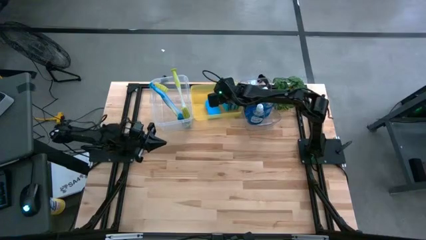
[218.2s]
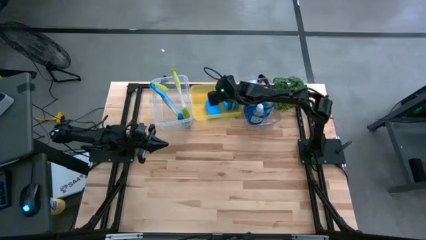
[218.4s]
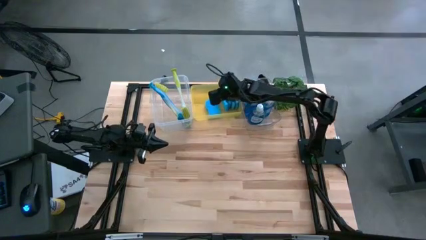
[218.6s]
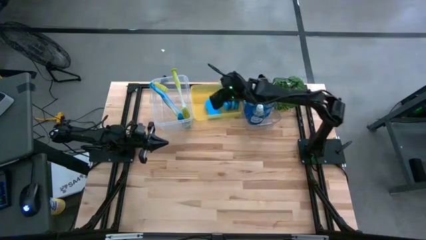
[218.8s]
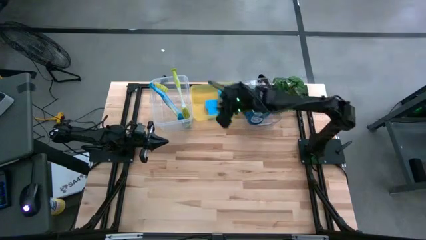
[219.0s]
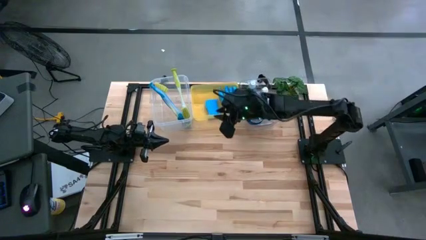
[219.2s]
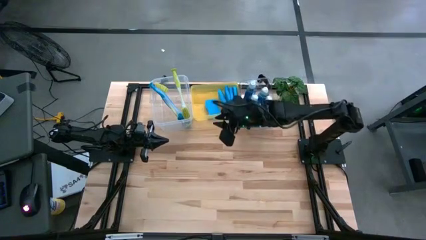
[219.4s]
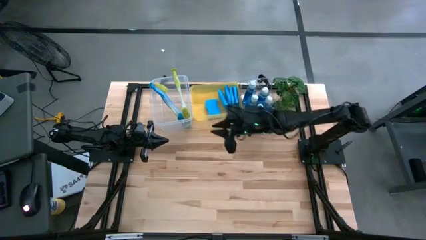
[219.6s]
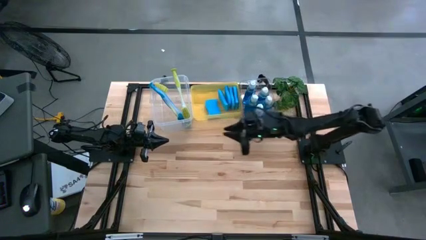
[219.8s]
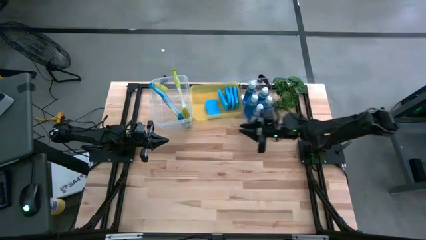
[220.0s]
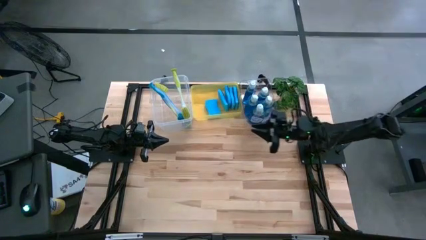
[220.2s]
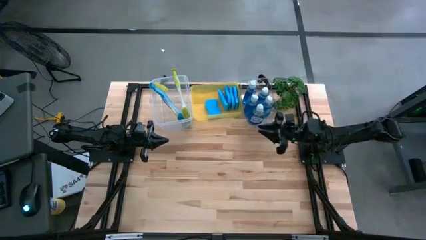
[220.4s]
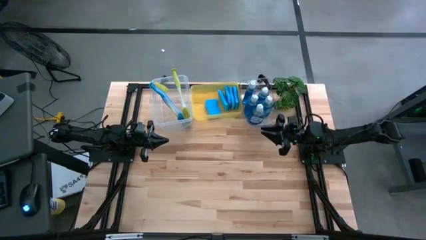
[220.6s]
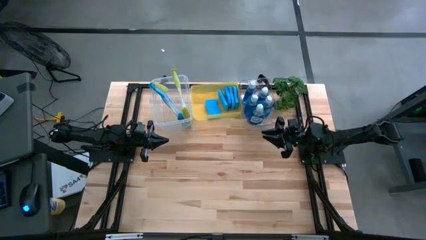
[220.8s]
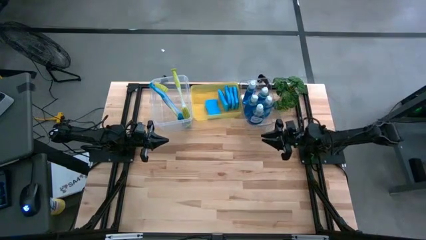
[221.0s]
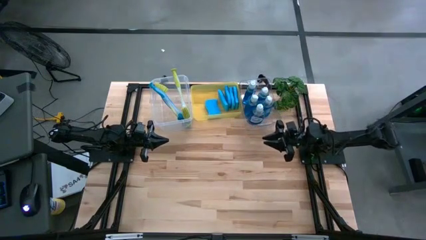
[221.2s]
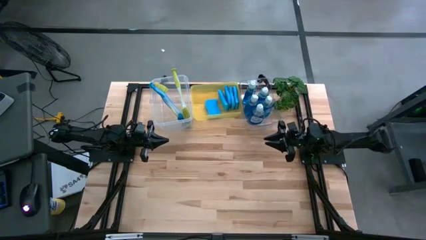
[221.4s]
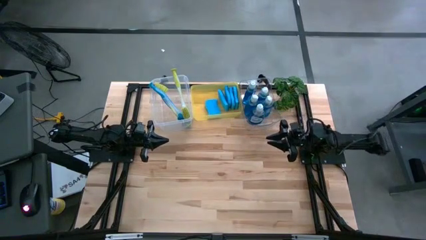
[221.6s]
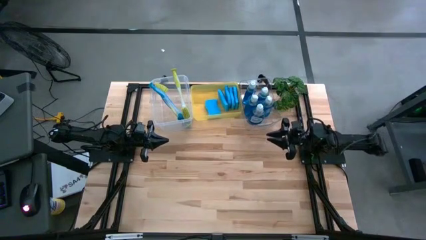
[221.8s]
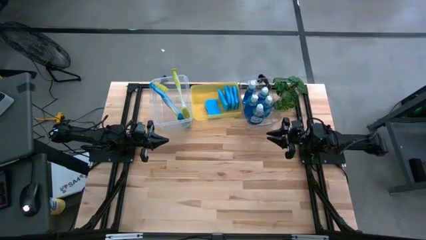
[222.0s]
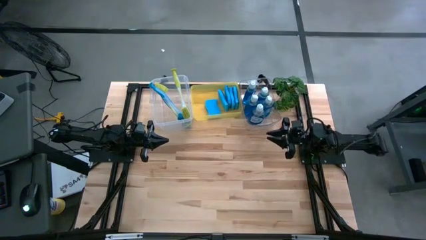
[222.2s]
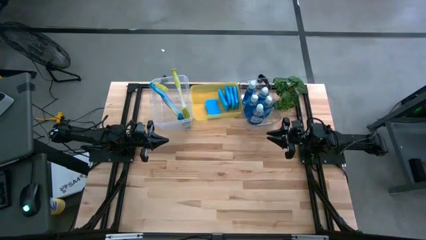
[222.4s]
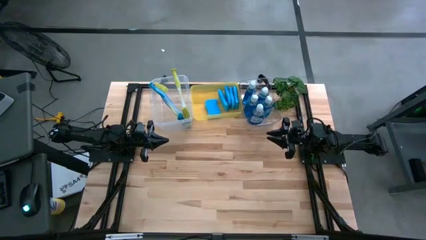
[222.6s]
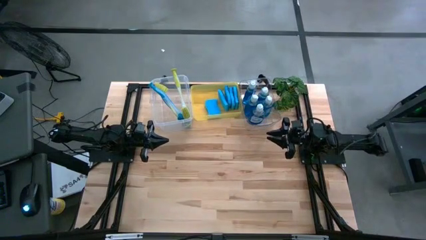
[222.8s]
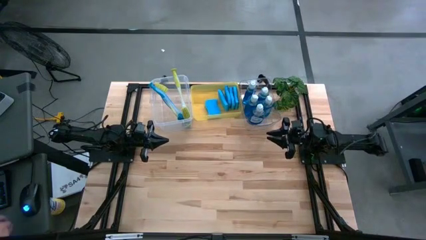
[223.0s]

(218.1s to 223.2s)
Task: Pick & Place Kitchen Sink Supplies
Return to Home Position

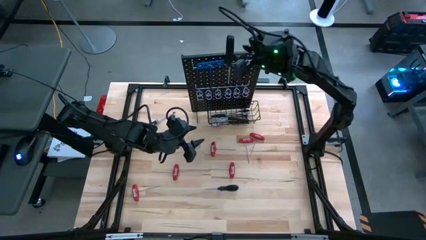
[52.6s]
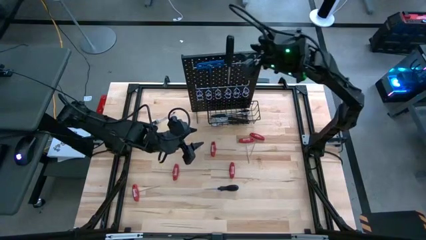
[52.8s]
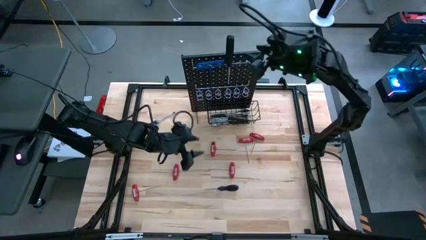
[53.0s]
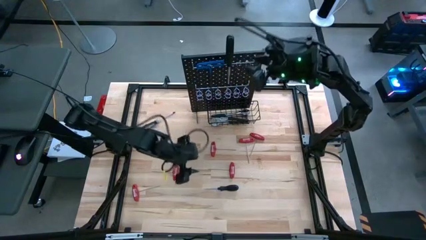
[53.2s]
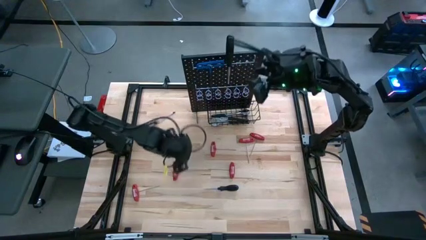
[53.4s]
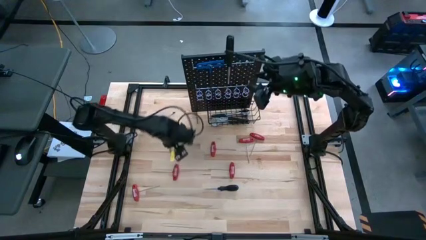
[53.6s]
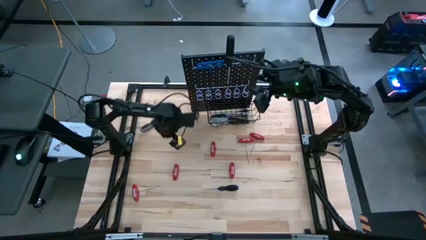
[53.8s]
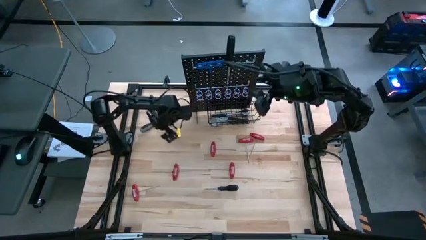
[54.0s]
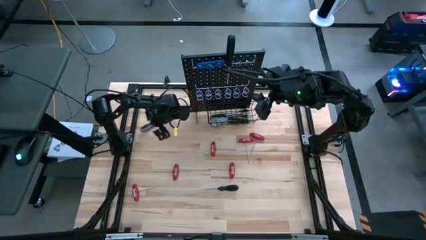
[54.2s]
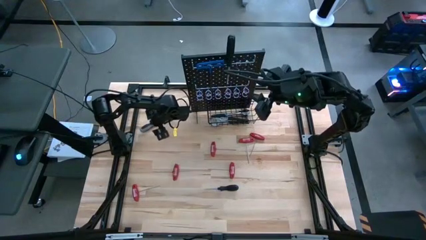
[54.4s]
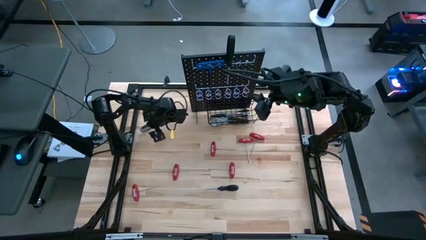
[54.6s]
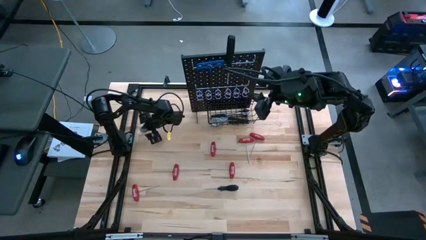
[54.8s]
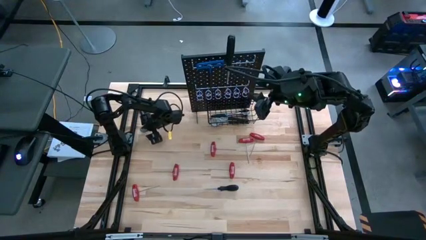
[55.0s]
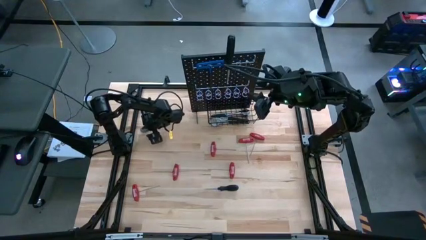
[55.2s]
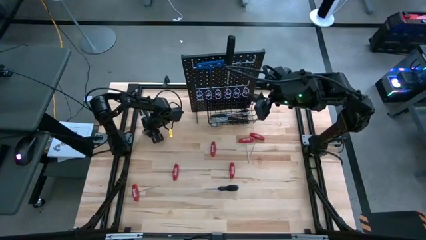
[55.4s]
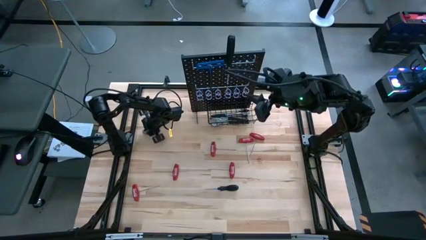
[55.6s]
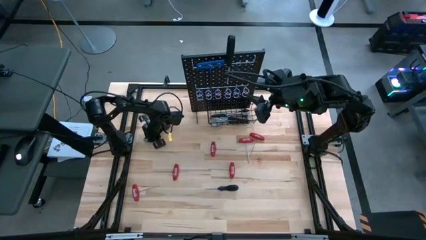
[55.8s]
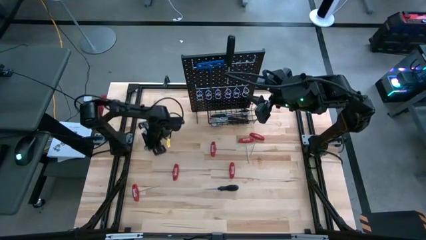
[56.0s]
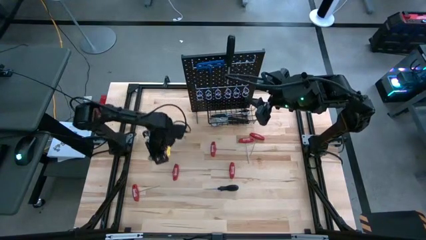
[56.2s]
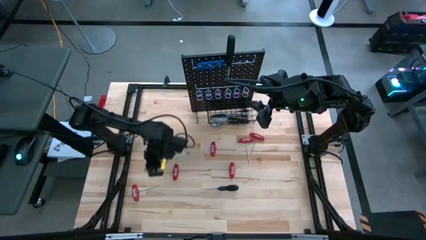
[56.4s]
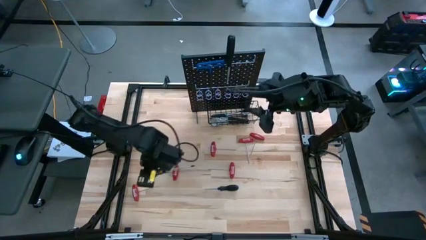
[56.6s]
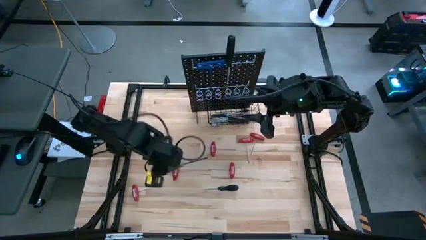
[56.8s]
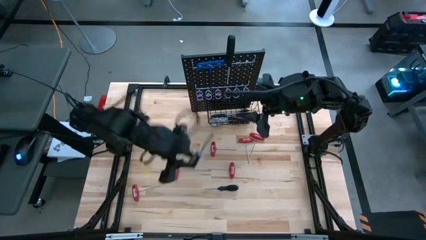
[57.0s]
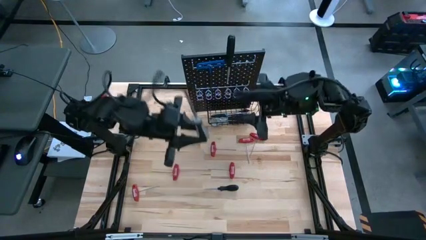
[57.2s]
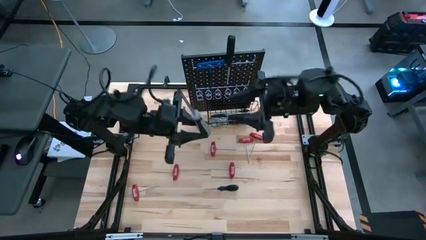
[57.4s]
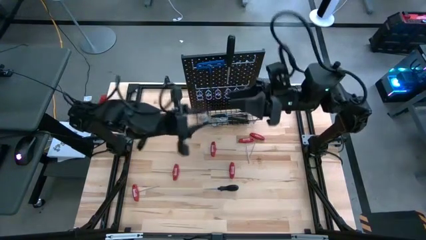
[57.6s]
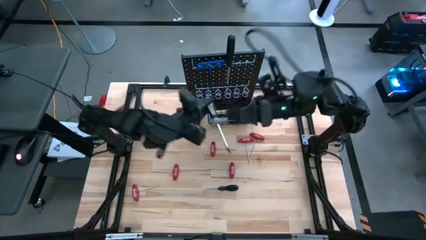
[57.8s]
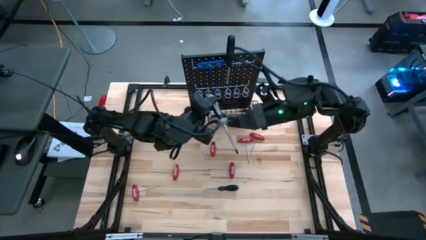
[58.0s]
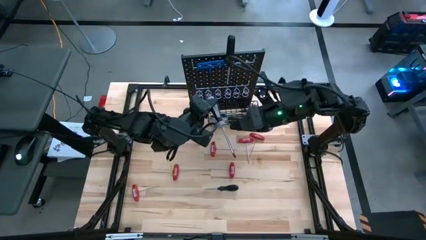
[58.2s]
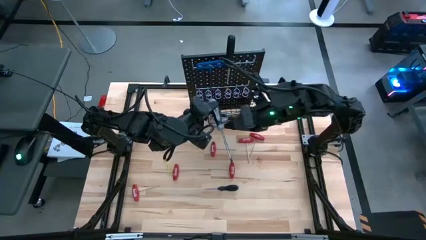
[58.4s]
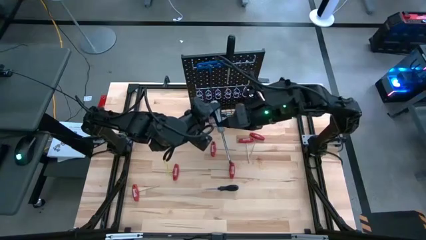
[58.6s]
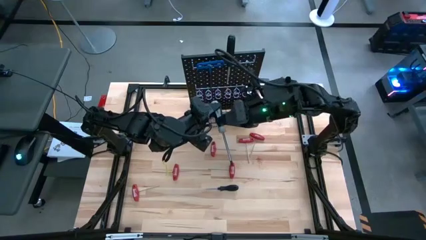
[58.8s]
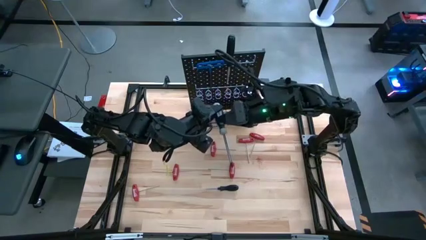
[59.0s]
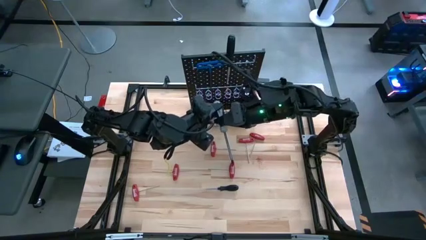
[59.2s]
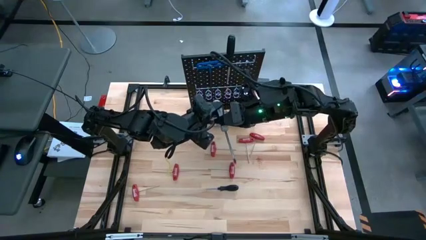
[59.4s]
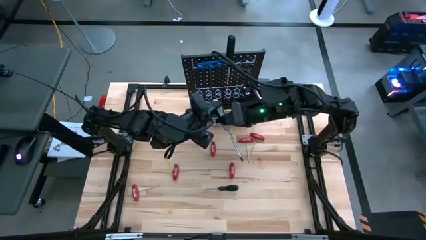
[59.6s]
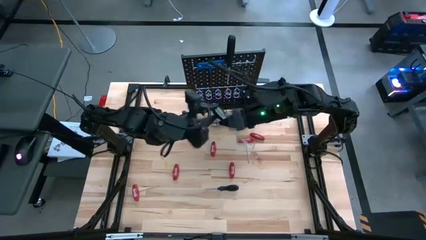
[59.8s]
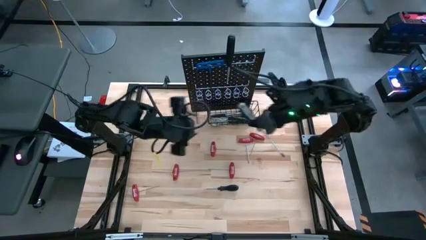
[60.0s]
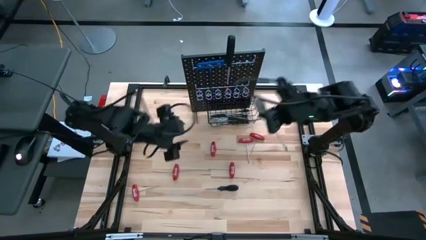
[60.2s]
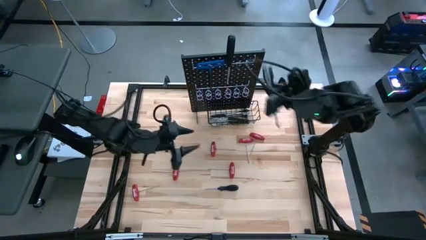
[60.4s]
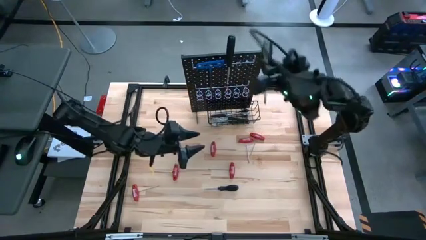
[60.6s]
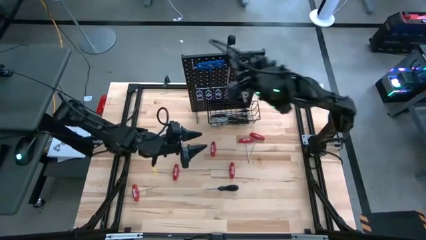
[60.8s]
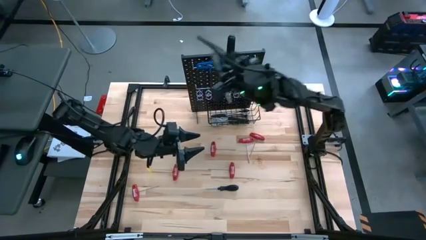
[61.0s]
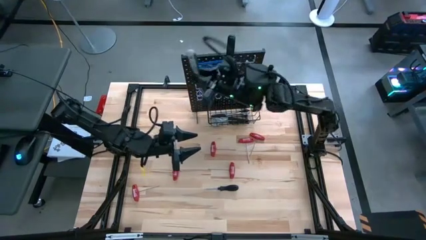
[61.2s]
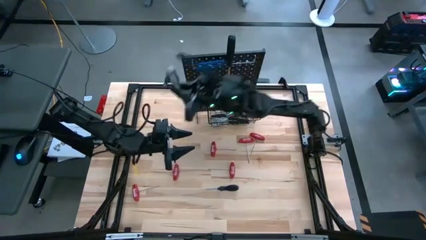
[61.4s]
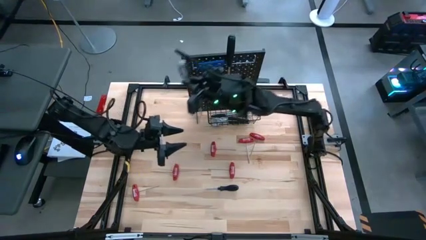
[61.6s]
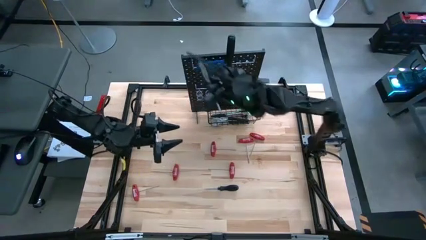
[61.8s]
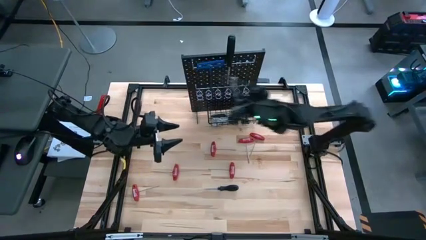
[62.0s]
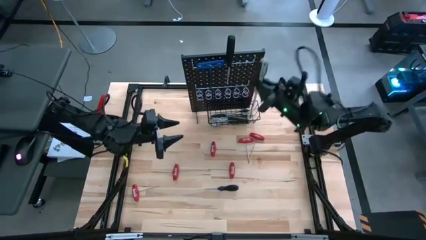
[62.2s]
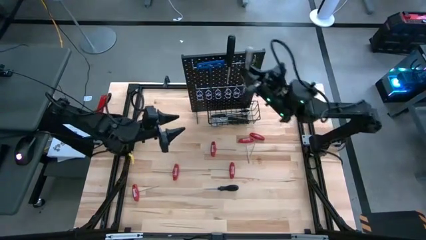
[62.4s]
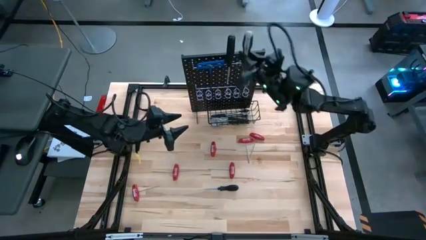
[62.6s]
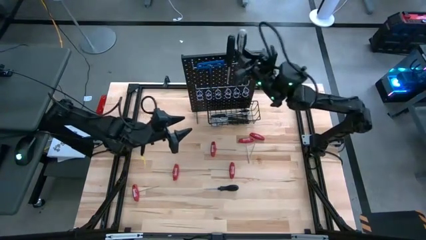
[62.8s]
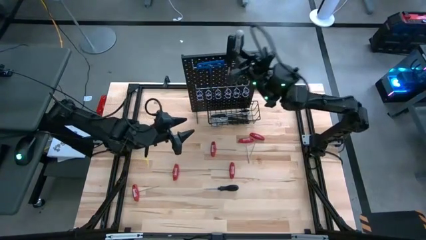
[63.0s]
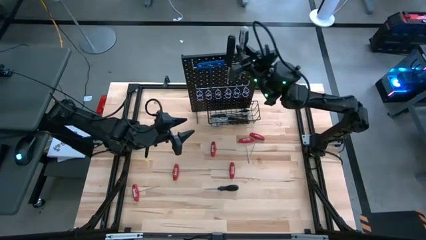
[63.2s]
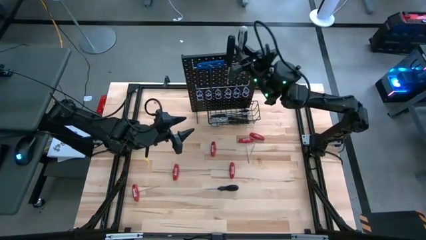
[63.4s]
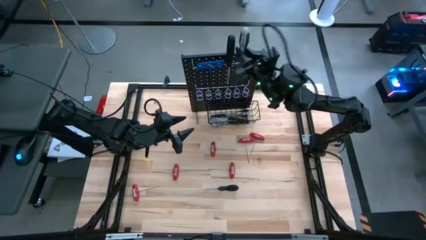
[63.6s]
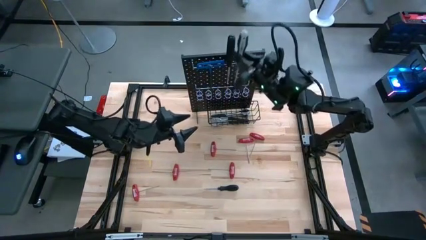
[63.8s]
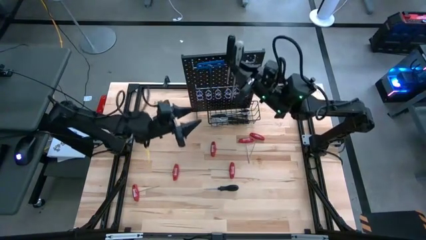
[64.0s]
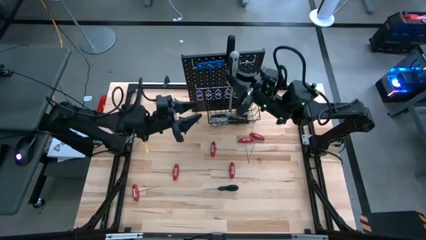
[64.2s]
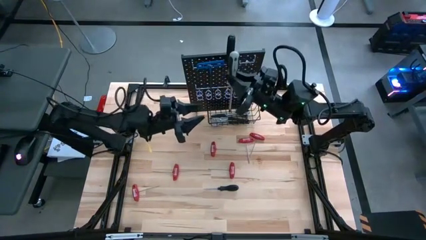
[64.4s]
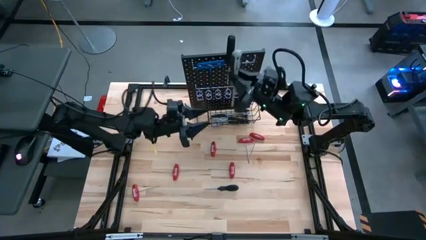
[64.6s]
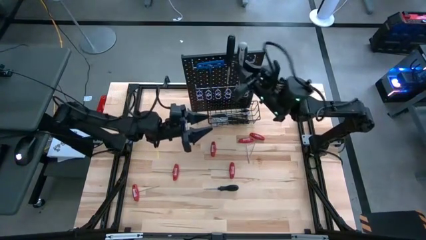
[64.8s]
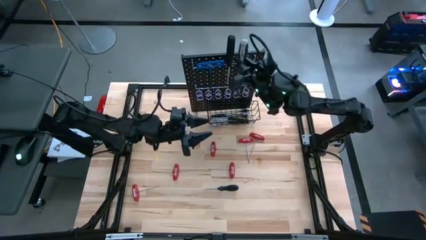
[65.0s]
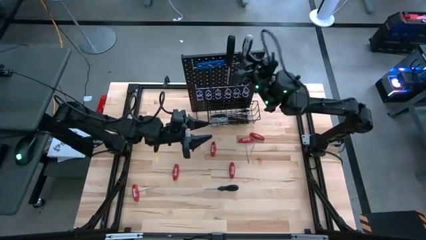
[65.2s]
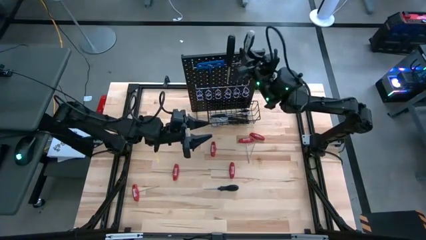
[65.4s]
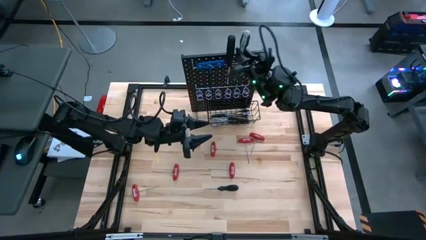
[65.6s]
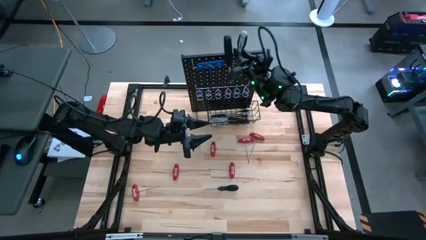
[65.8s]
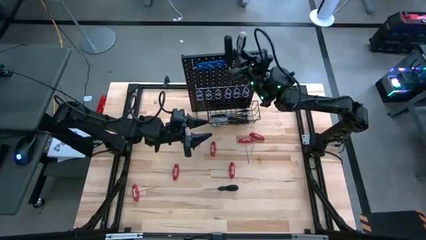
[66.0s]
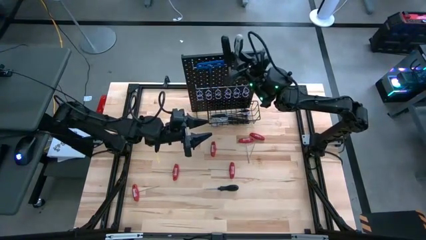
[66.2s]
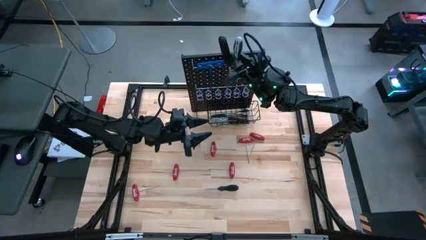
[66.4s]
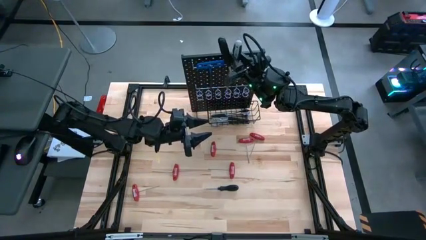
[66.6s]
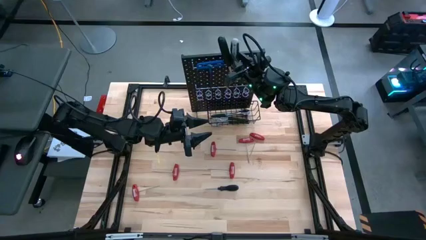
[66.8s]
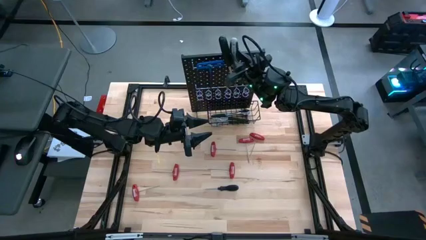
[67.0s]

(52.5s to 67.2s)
Task: Hang tools onto peg board
Hang the grey screwdriver on the pegboard
